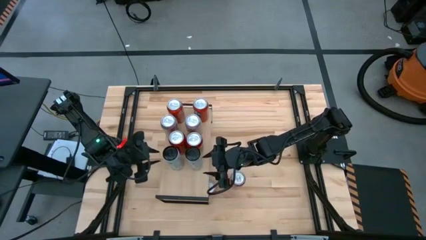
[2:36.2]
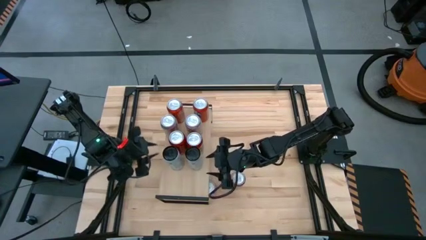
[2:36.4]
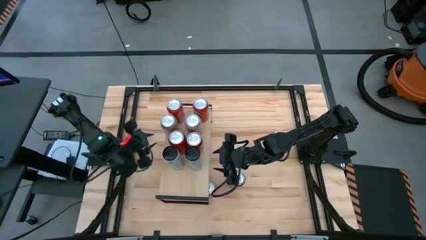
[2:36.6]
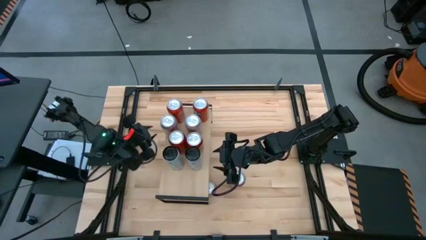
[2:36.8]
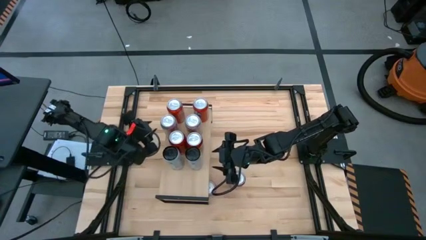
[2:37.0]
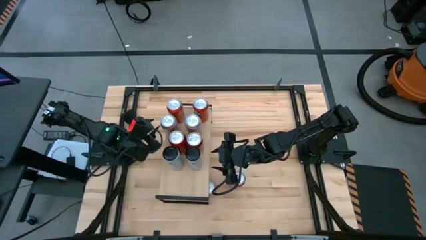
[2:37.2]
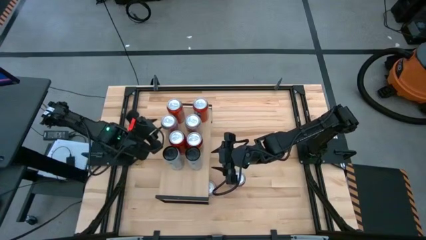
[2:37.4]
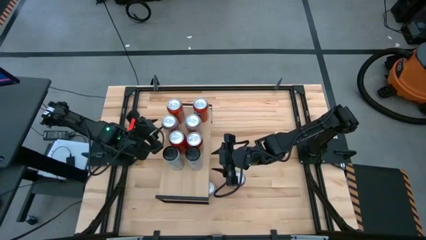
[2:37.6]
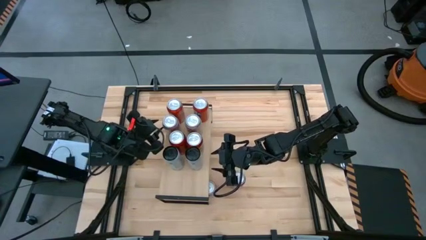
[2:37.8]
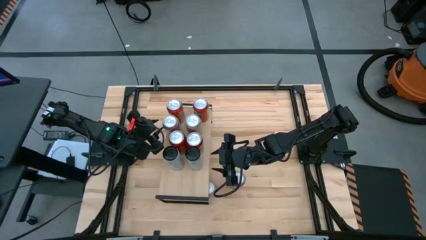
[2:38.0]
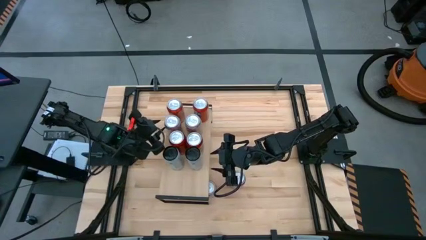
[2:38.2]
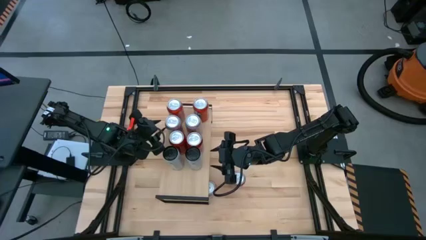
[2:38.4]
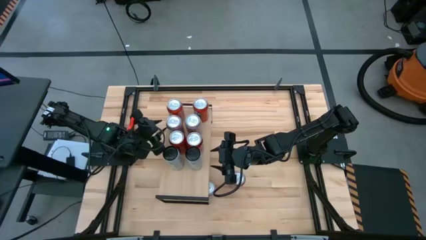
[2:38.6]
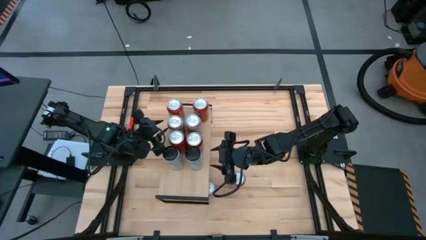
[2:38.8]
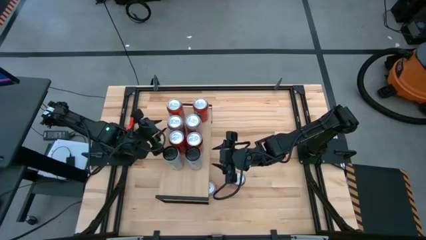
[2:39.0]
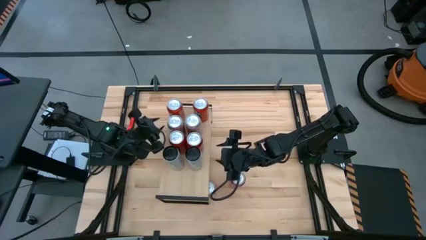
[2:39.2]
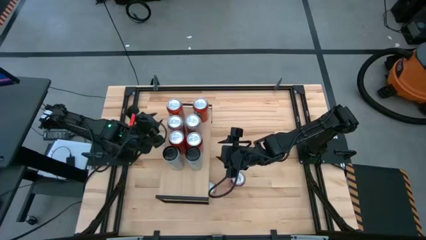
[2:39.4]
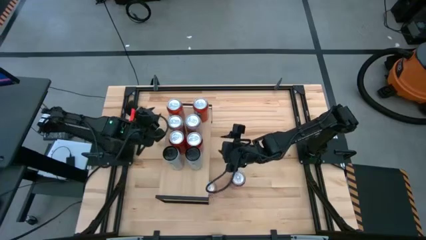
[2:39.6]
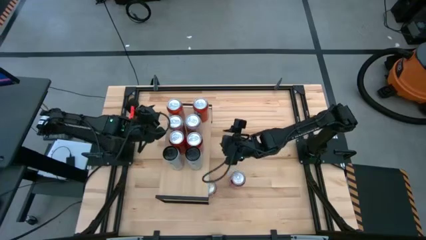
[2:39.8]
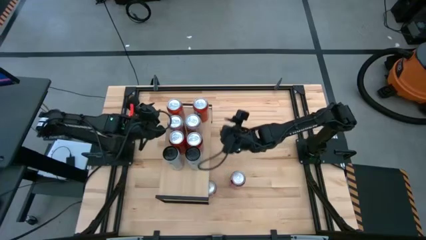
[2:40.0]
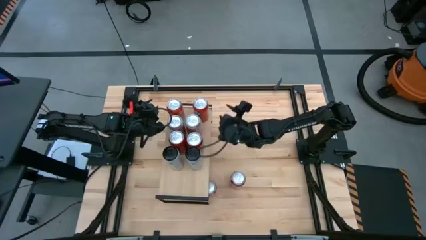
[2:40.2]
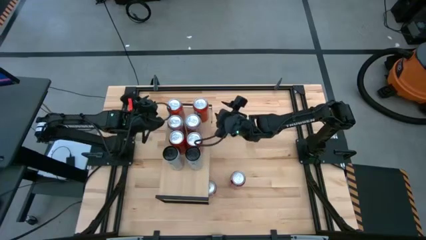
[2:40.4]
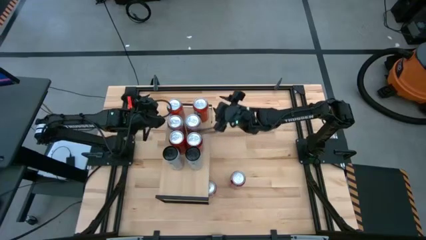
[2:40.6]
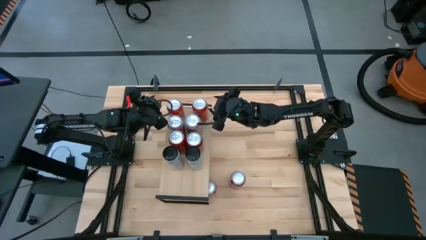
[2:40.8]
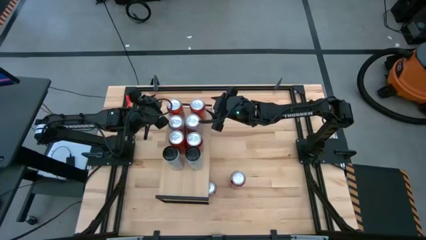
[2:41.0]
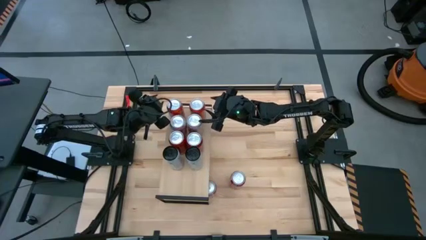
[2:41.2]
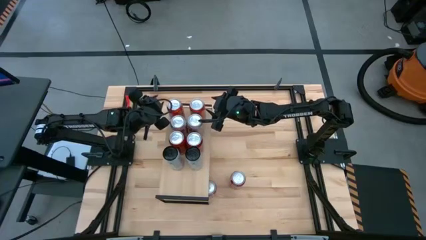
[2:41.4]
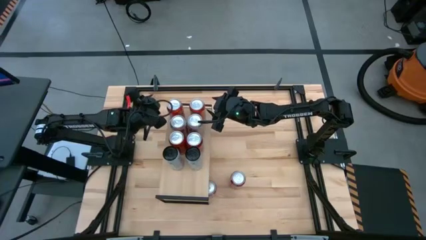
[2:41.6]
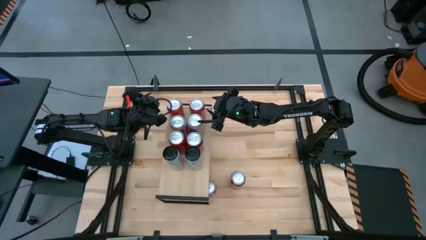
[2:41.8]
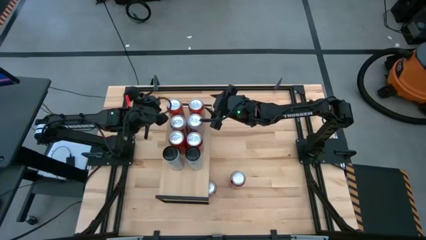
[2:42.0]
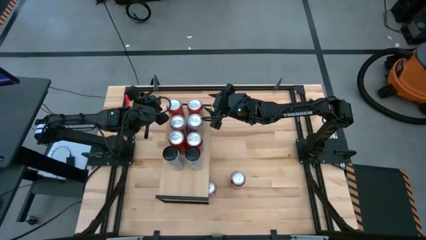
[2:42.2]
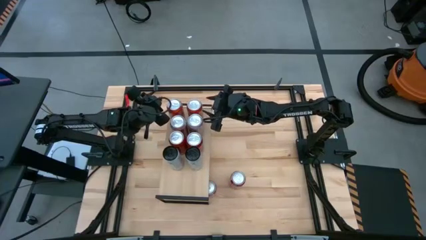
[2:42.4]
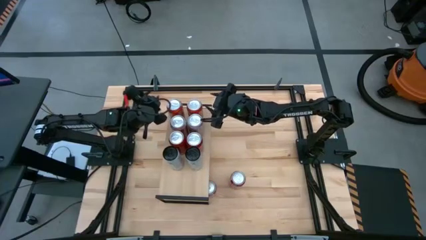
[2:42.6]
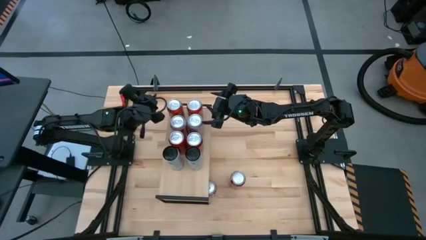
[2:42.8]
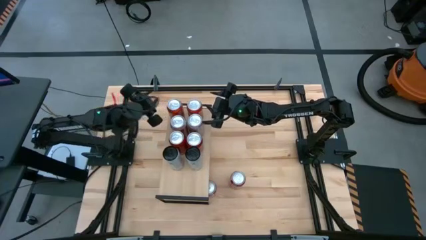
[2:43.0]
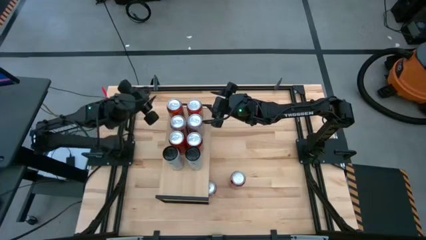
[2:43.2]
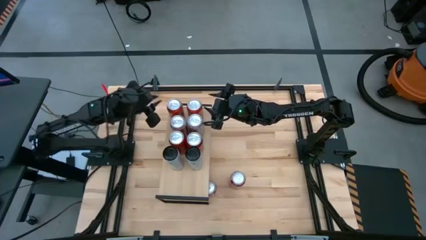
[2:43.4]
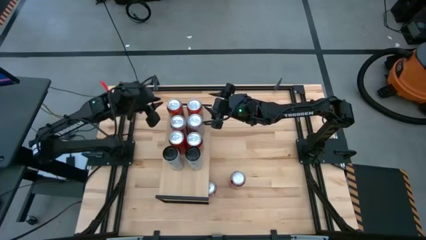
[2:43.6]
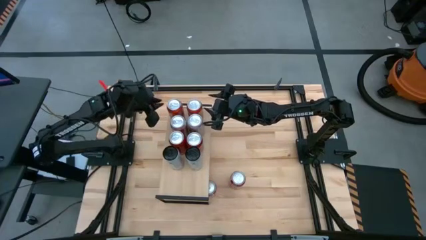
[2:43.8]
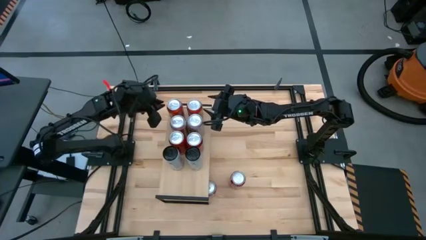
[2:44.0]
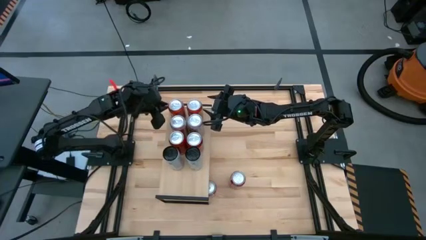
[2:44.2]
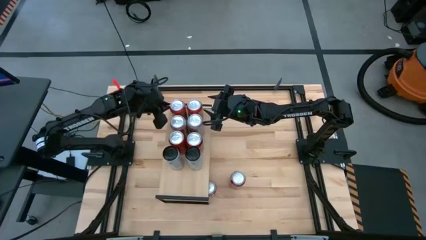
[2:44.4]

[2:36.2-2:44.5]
Task: Place canned beverage on shelf
Adjust the soda cans on the shelf

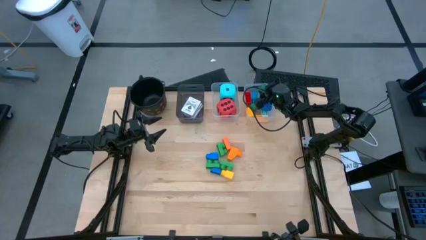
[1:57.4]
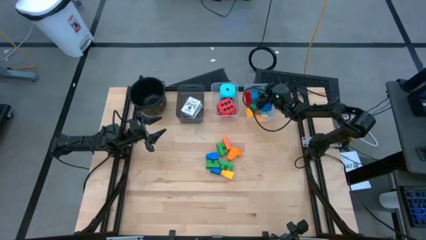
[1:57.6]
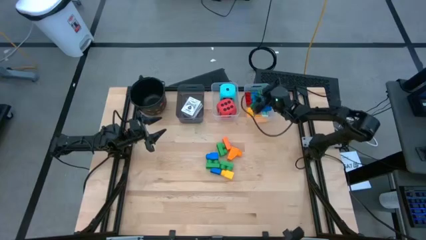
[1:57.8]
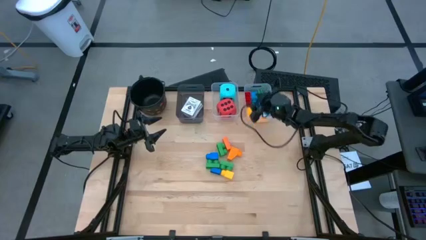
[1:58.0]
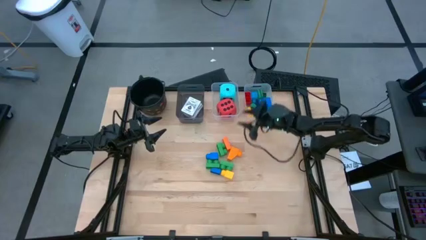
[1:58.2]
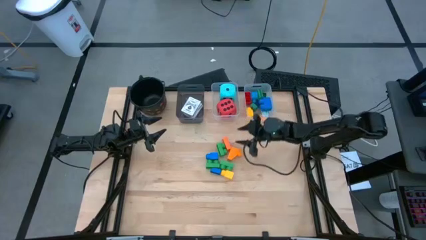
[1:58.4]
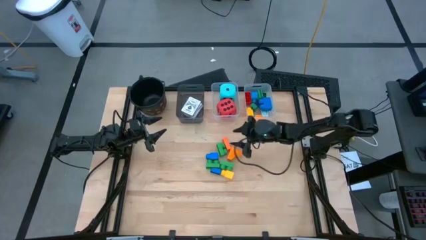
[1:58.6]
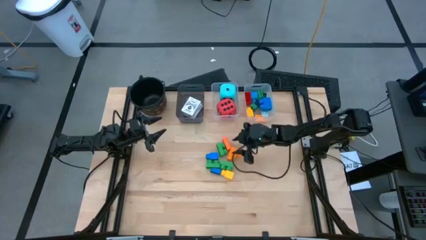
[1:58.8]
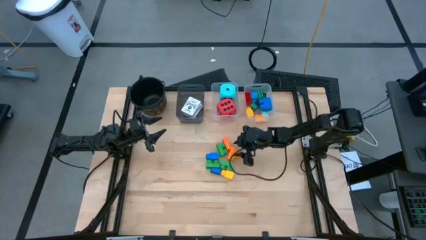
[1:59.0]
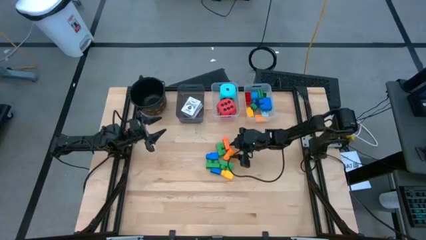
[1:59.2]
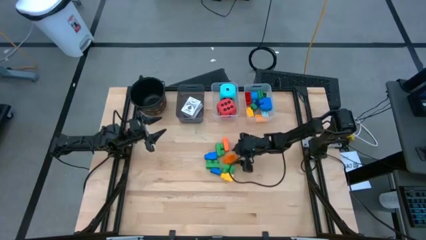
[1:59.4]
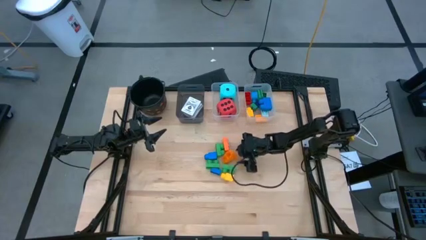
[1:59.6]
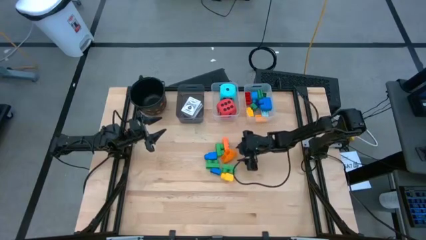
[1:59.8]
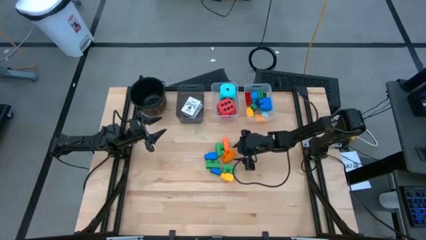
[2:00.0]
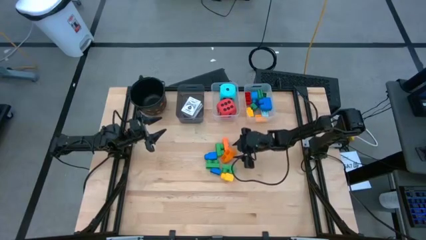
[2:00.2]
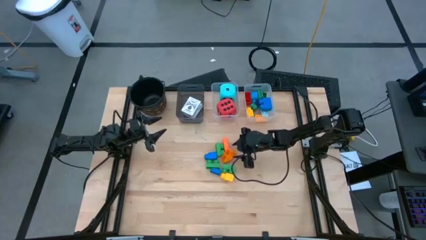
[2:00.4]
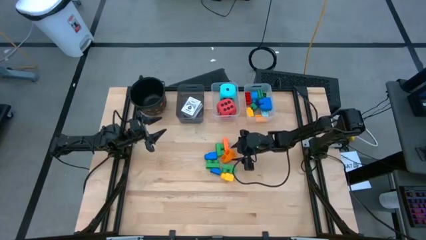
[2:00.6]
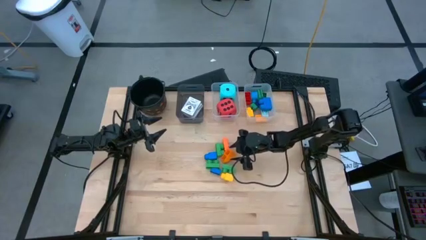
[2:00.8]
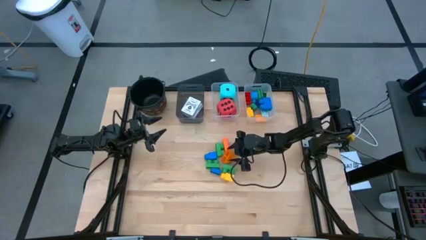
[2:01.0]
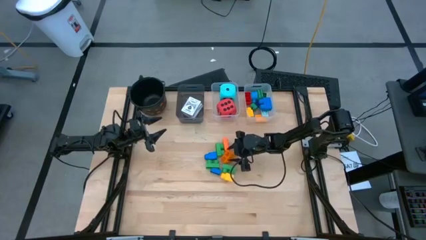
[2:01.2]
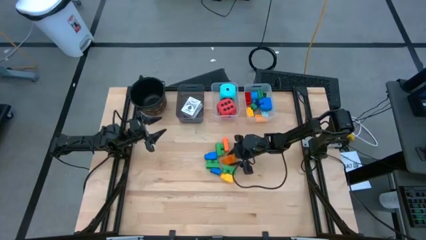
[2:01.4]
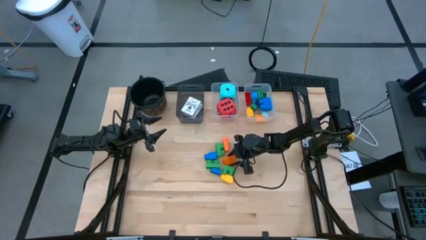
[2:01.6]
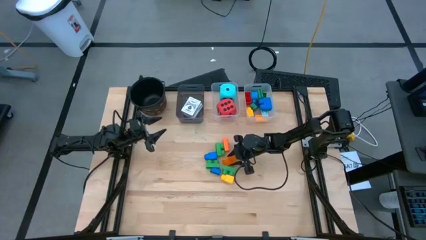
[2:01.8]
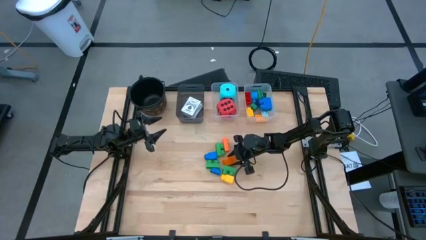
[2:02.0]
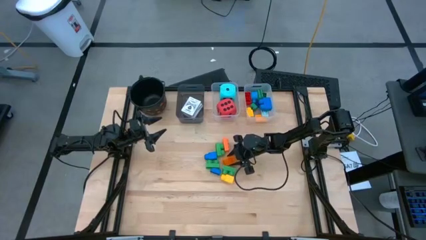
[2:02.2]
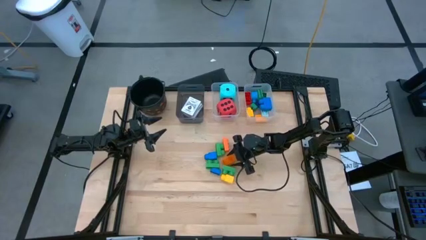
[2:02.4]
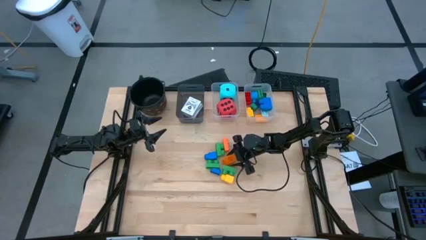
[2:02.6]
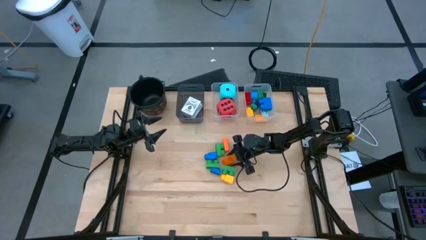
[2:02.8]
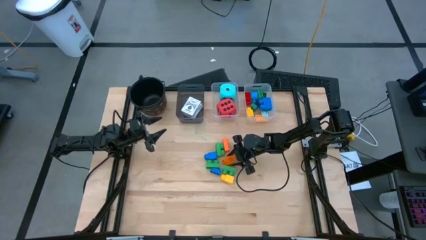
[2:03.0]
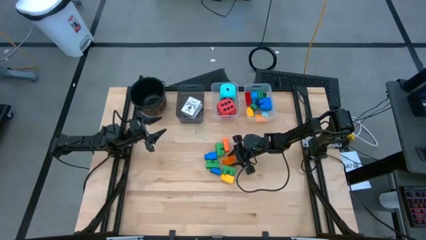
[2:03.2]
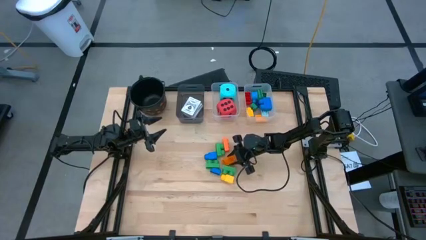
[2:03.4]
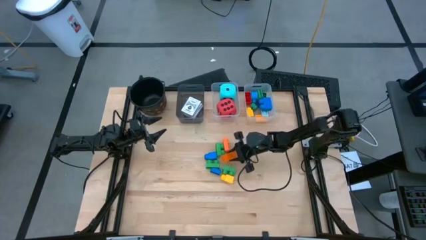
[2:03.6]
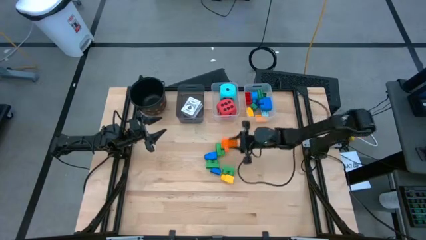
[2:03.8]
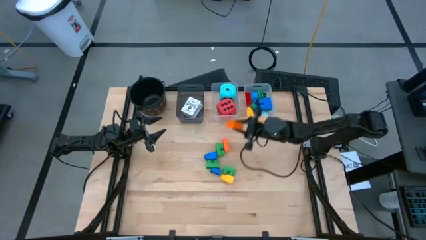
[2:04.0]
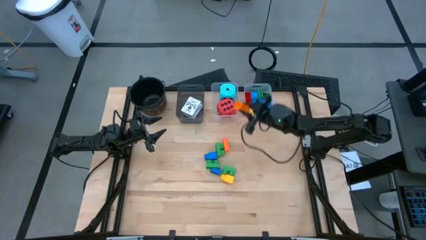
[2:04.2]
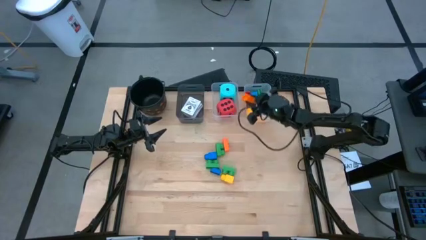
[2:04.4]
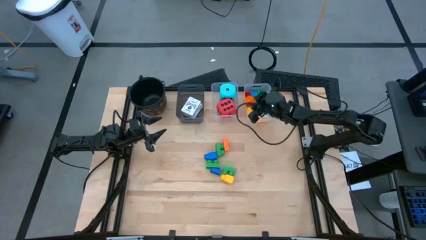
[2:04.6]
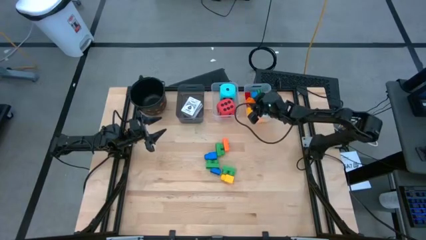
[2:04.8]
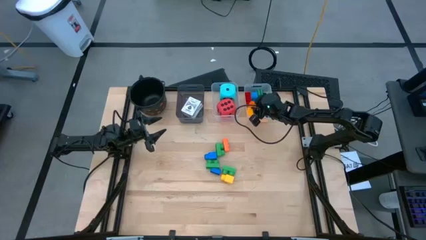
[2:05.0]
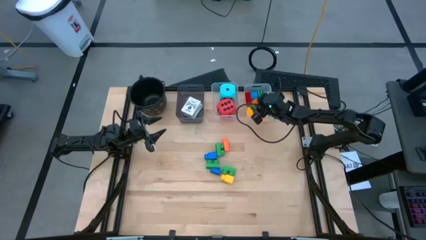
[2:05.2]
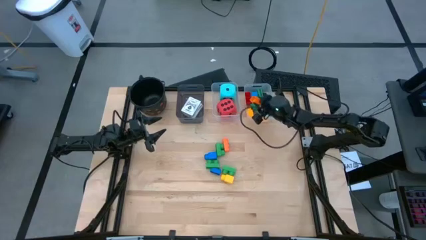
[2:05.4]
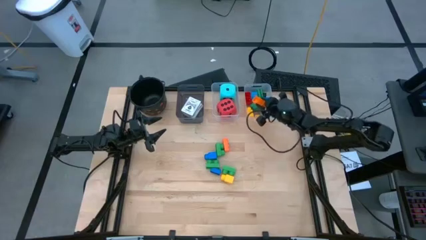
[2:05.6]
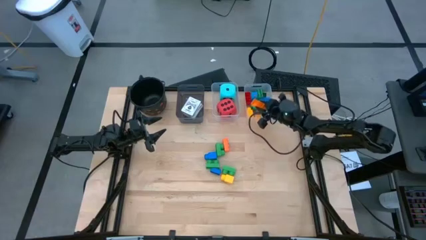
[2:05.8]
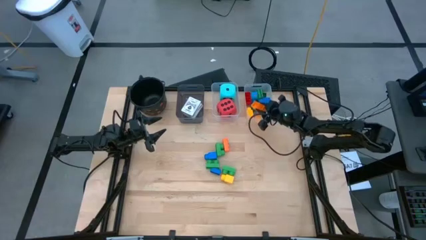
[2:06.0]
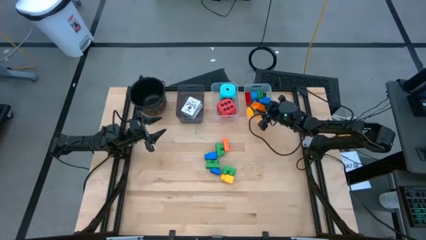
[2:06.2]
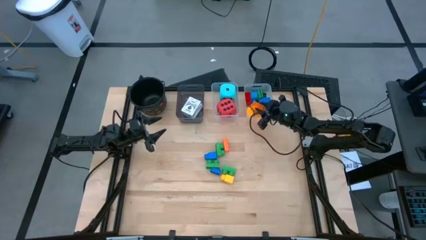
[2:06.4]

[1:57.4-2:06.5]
Task: Pick & Place Toys
Put the orange one stud game piece into the right transparent bin
